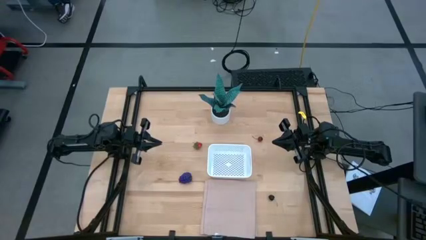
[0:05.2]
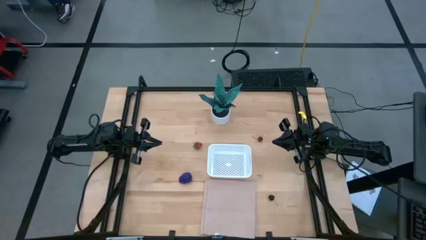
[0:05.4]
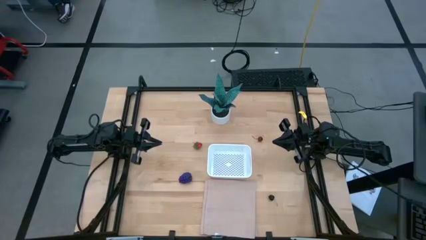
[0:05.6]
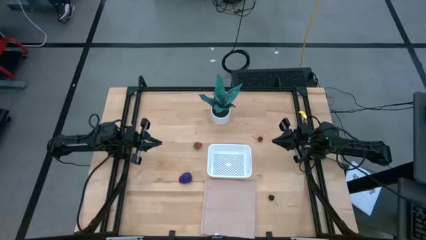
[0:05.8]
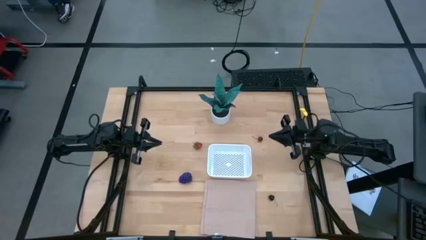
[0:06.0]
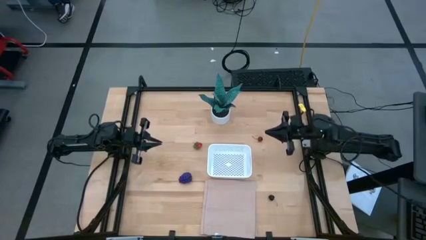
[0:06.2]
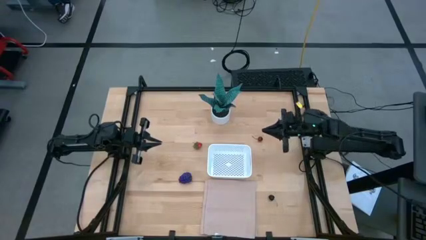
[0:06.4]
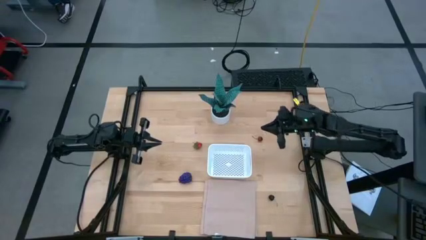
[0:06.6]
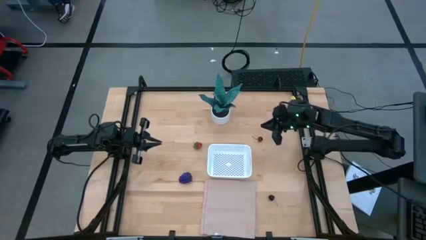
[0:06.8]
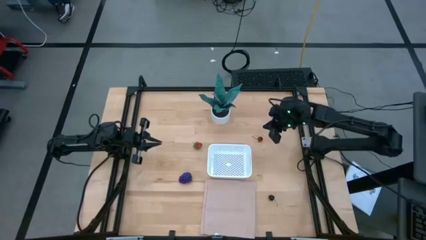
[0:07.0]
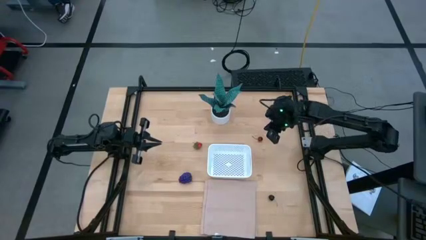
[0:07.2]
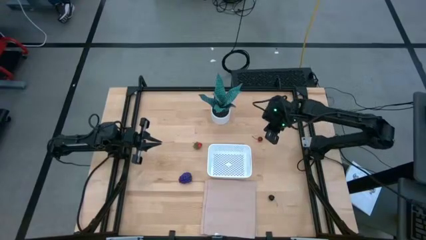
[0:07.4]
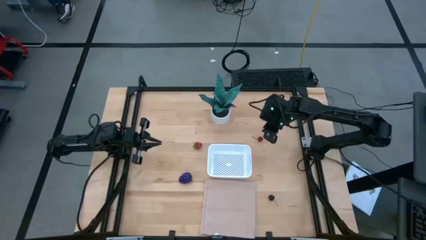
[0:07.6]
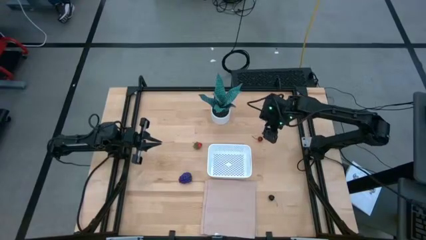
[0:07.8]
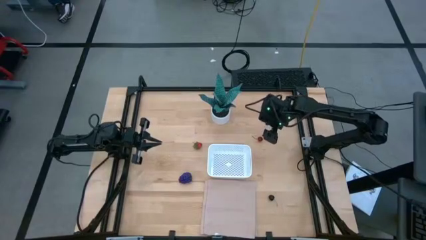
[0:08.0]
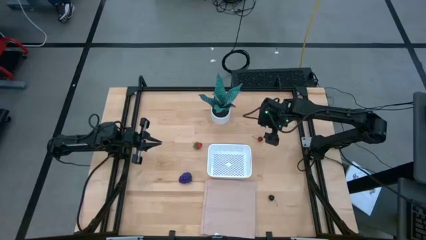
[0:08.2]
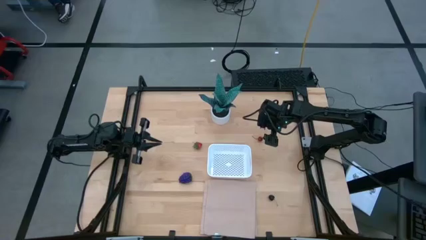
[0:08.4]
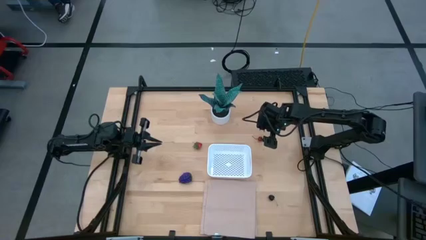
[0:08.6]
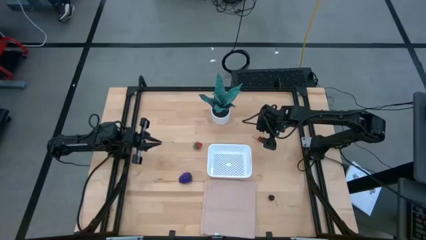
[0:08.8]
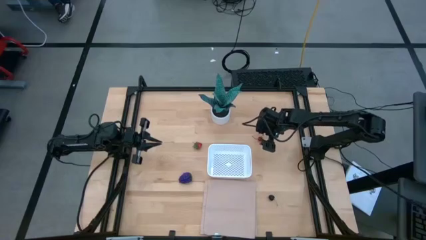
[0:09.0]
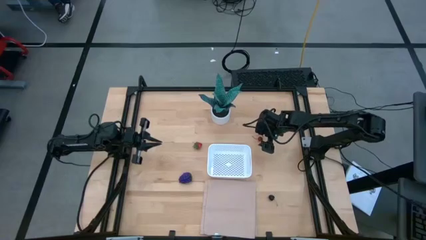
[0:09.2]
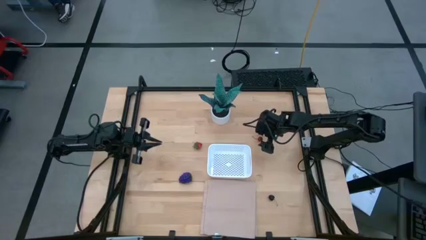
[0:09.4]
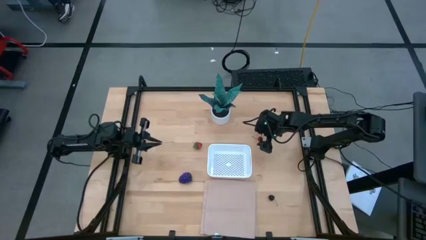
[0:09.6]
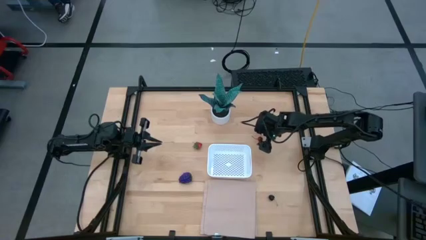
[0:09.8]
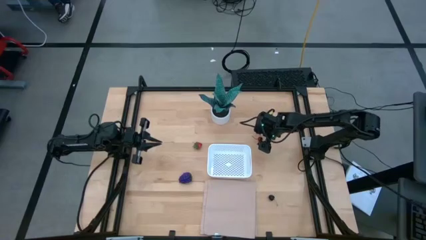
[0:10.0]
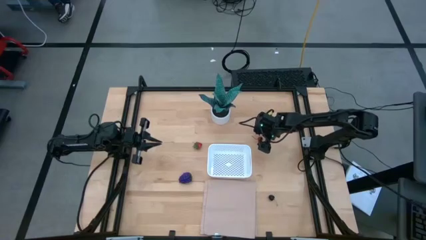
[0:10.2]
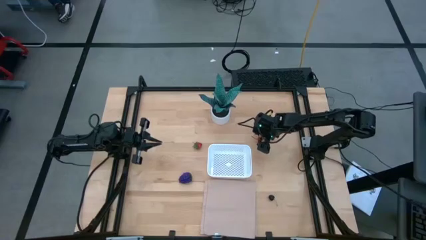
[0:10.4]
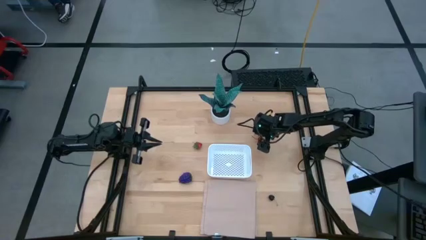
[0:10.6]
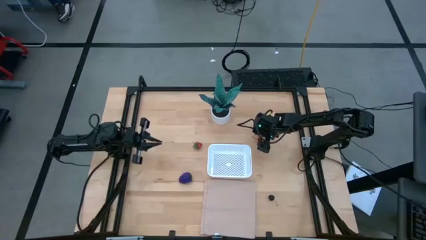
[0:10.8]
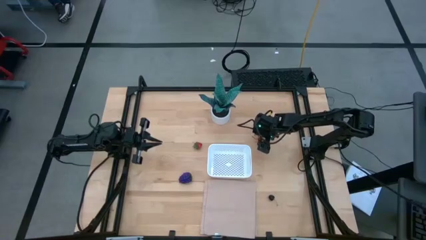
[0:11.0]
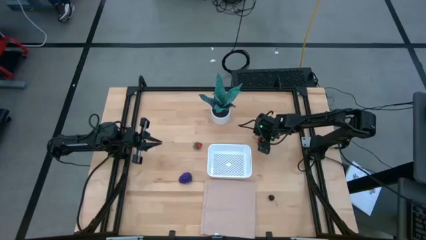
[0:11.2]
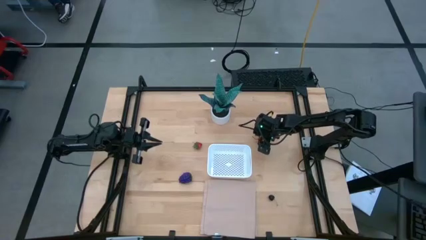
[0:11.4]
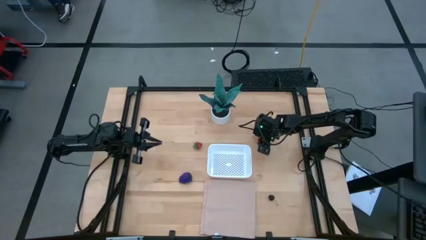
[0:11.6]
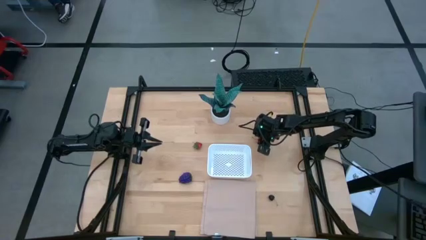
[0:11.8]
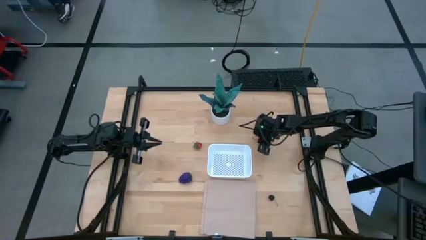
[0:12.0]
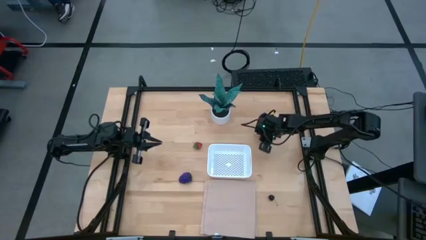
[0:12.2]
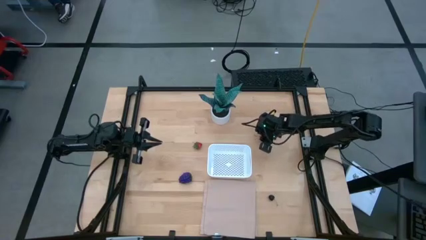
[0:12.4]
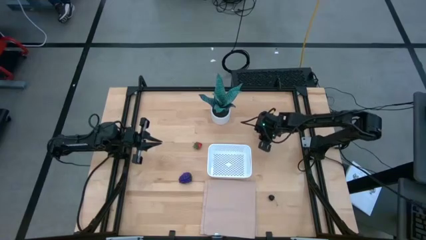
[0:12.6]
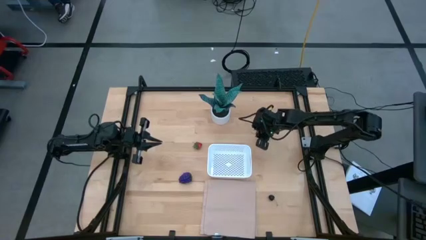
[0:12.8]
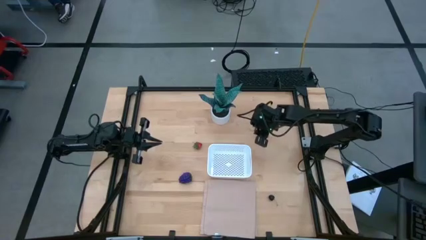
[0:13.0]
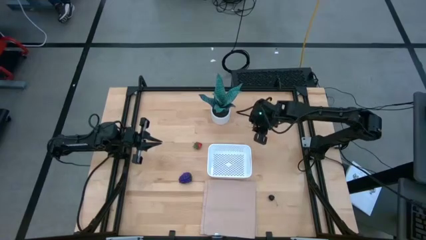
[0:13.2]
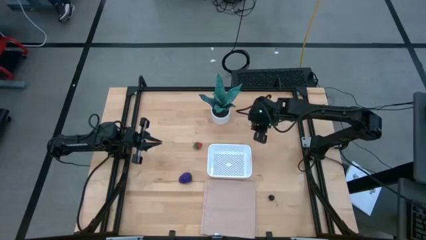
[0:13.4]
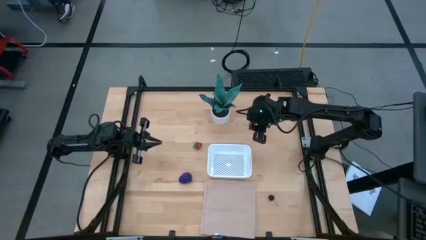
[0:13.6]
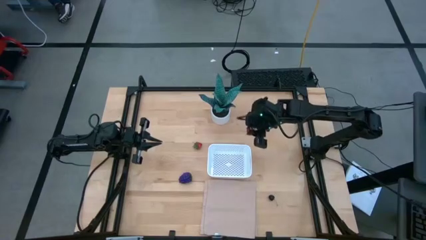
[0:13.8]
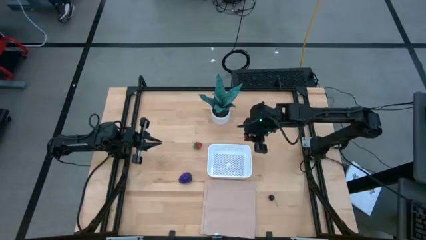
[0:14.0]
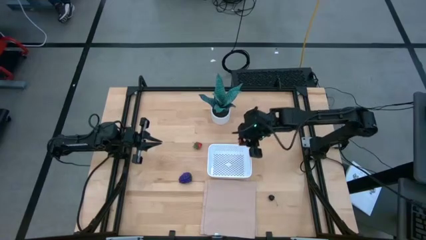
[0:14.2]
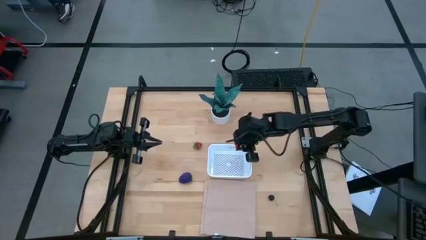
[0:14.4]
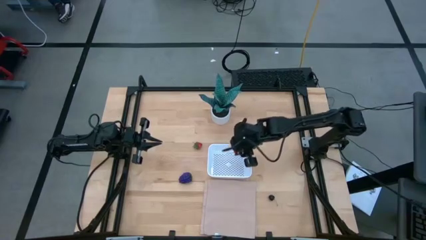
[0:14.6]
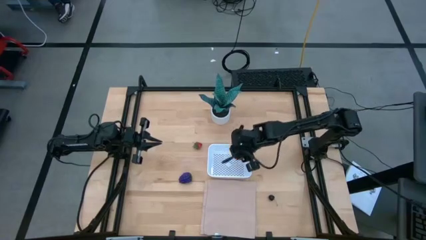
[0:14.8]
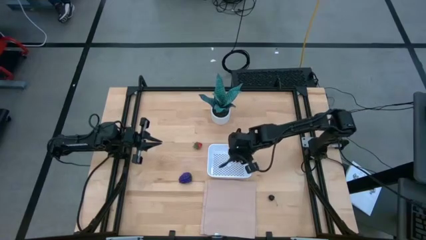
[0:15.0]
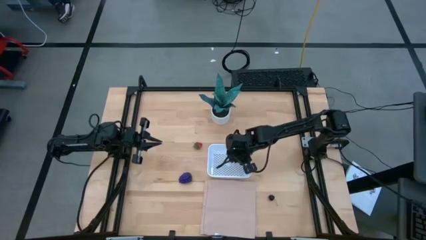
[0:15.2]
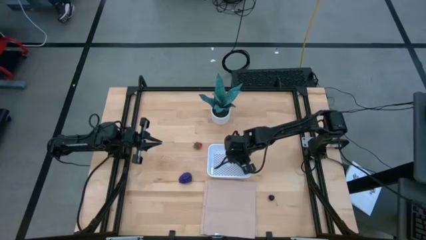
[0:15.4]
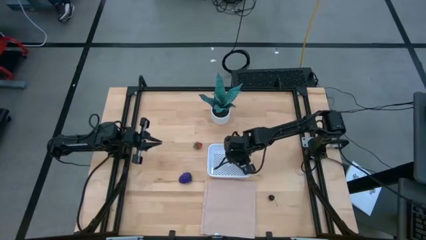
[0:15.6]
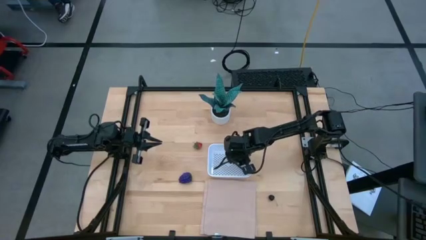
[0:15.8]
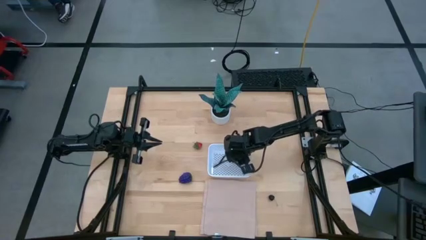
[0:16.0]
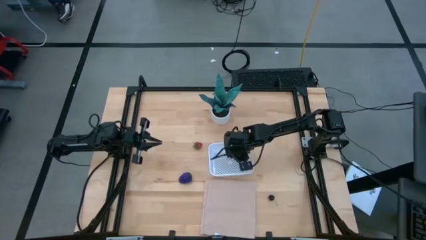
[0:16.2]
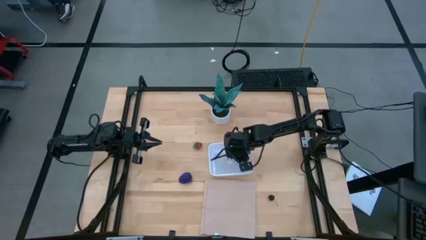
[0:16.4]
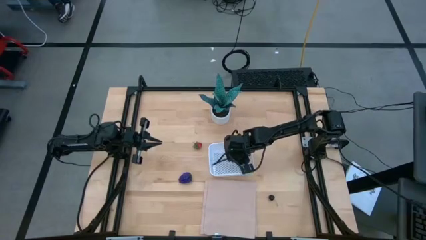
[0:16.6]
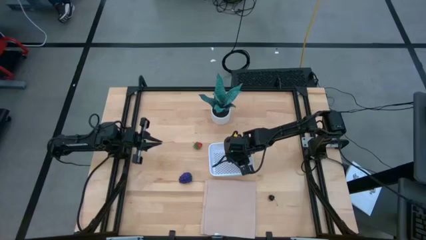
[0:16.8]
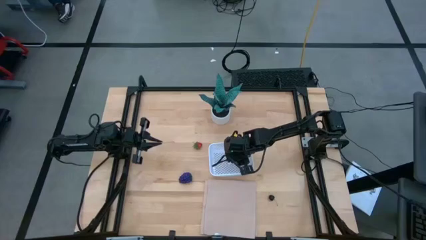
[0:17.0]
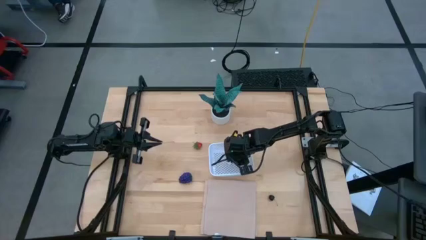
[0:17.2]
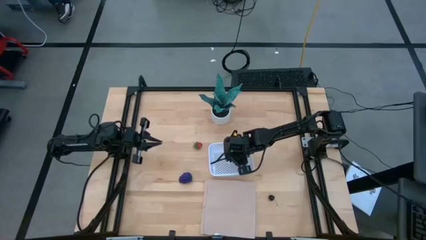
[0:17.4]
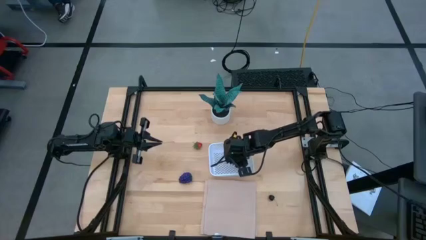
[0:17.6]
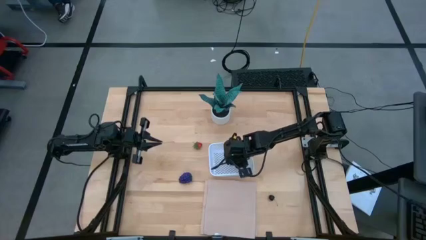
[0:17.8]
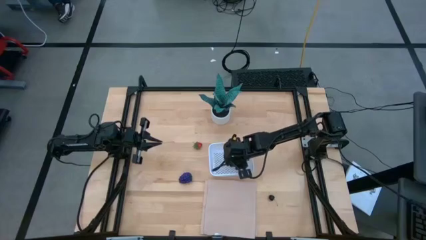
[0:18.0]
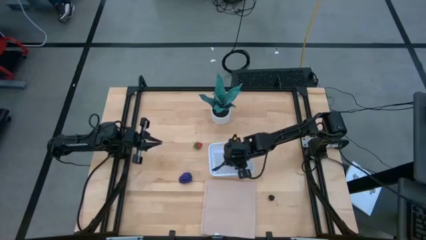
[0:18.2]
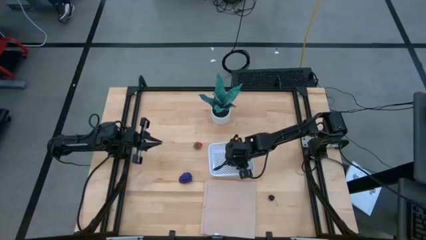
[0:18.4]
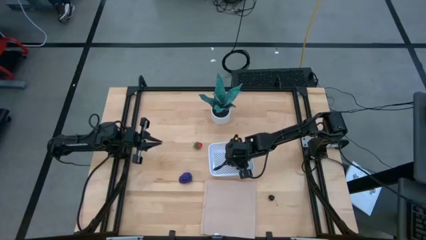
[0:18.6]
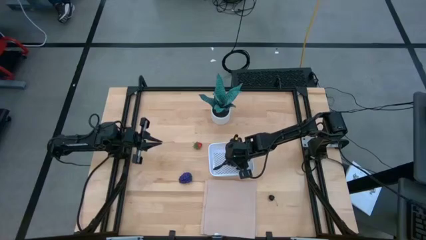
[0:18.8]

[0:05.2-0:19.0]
Task: Pick and placing Produce into tupperware
Put the red cherry into the basket
